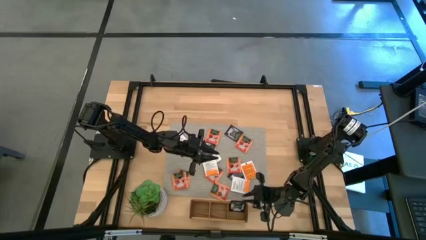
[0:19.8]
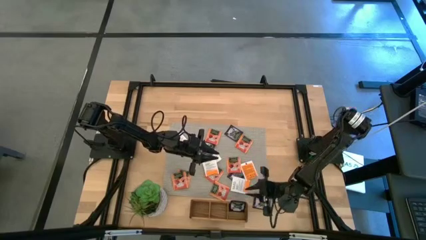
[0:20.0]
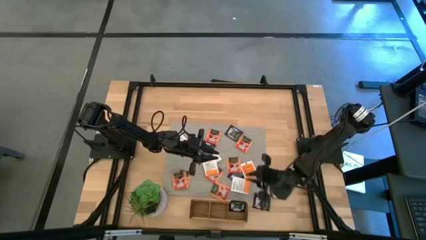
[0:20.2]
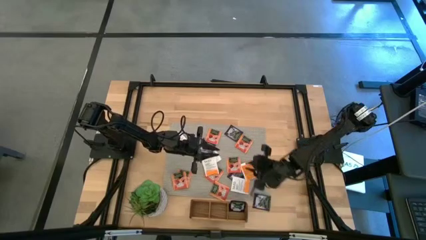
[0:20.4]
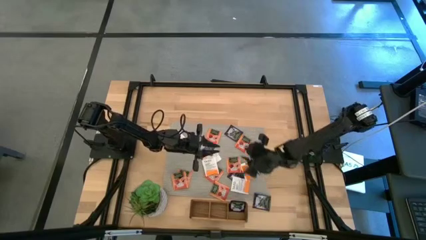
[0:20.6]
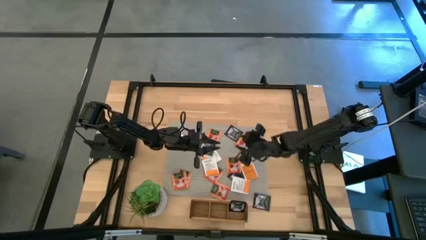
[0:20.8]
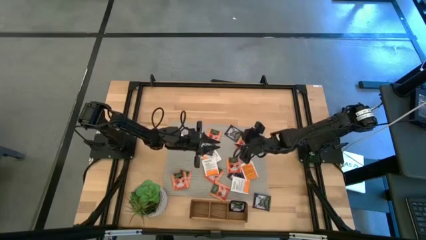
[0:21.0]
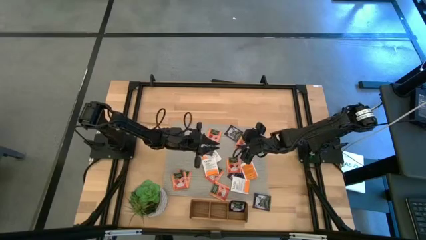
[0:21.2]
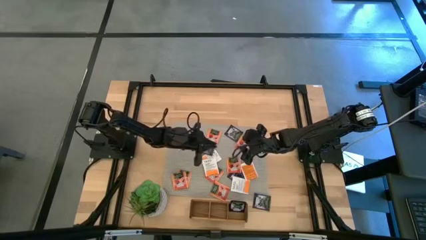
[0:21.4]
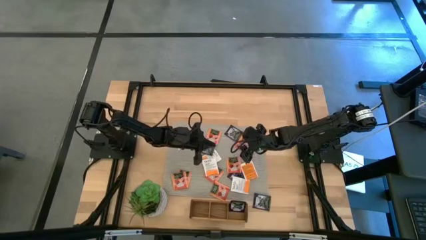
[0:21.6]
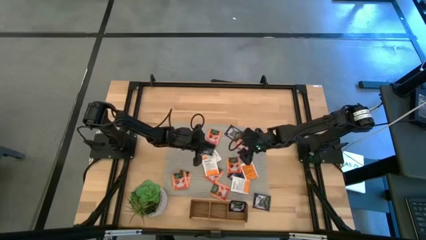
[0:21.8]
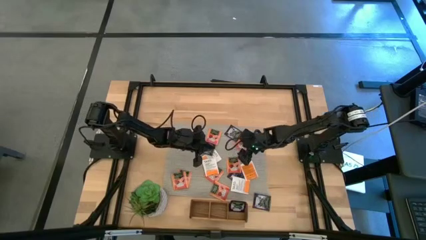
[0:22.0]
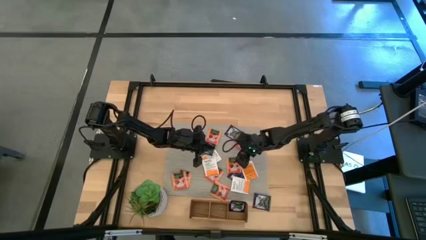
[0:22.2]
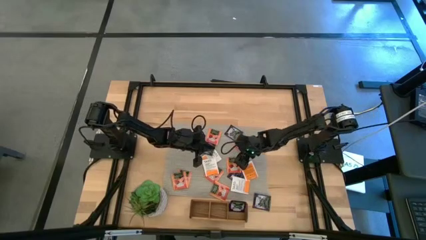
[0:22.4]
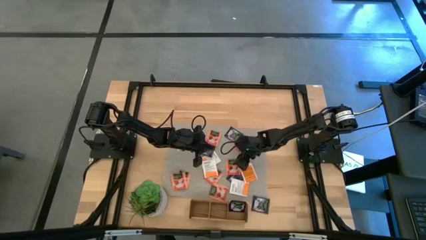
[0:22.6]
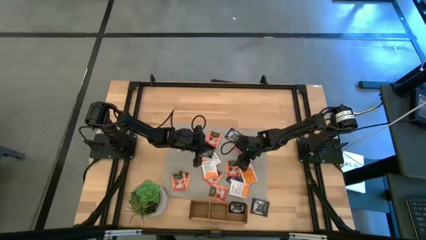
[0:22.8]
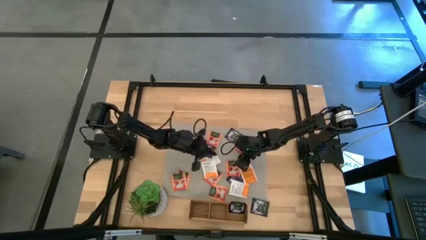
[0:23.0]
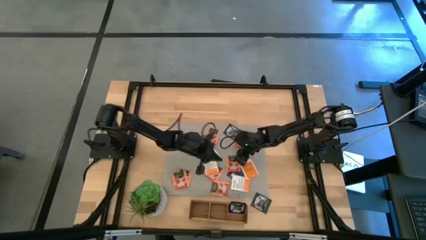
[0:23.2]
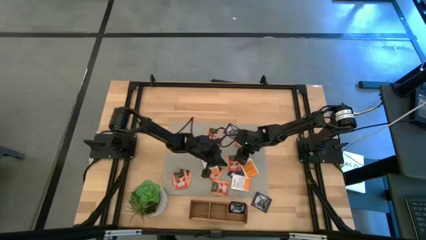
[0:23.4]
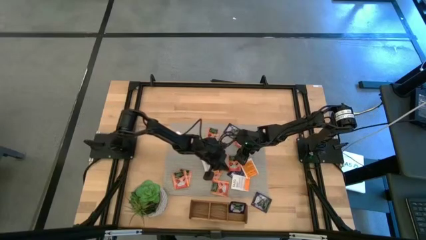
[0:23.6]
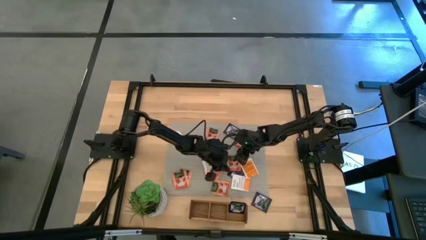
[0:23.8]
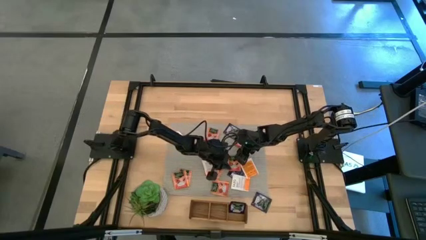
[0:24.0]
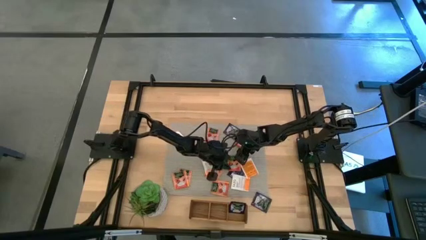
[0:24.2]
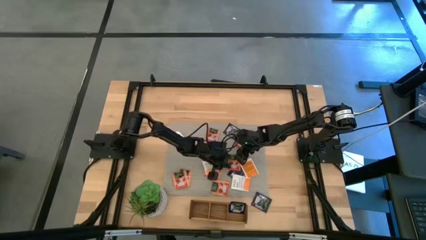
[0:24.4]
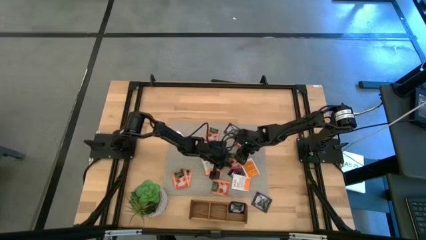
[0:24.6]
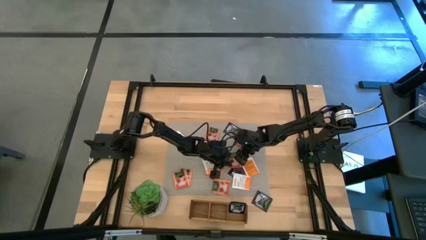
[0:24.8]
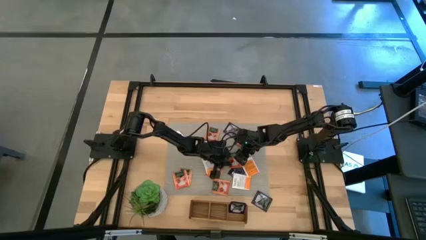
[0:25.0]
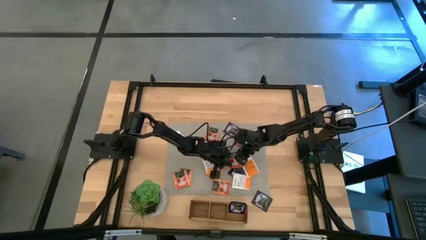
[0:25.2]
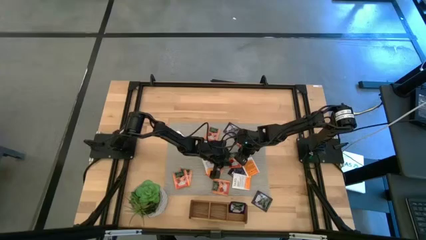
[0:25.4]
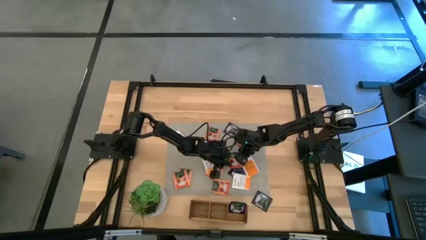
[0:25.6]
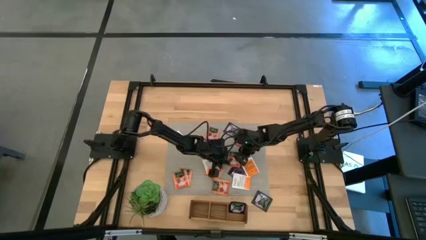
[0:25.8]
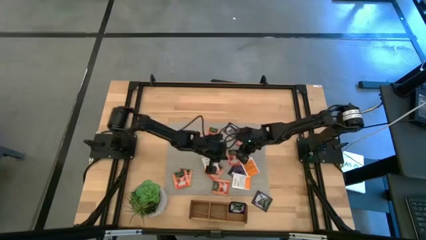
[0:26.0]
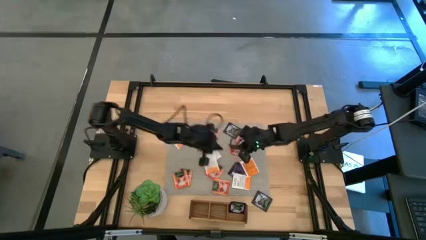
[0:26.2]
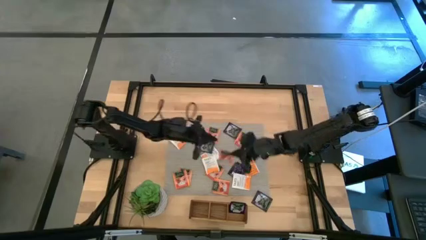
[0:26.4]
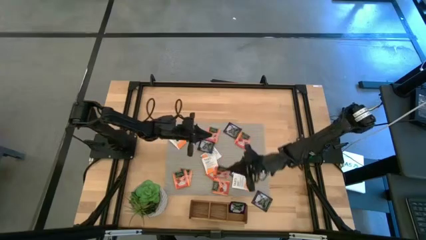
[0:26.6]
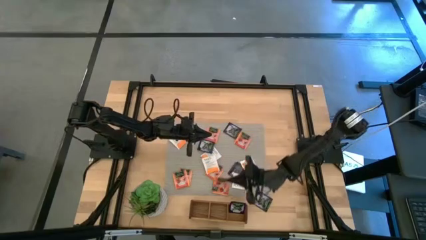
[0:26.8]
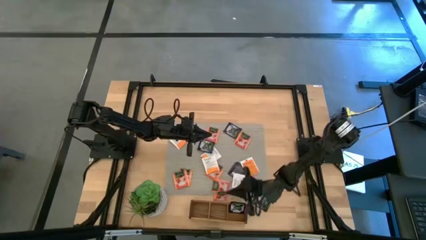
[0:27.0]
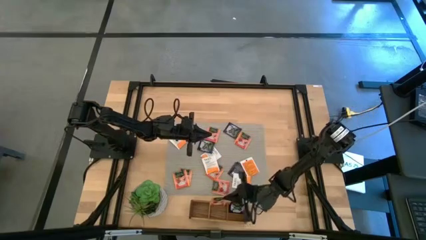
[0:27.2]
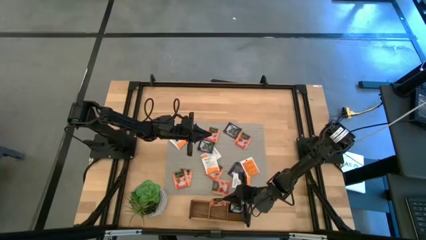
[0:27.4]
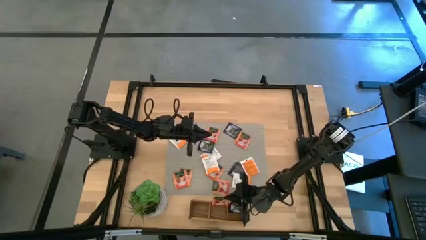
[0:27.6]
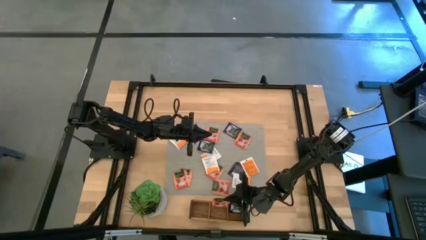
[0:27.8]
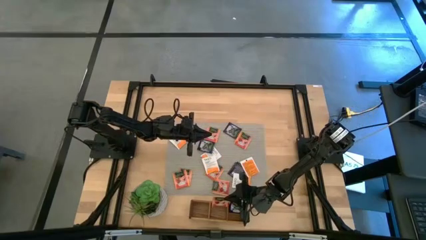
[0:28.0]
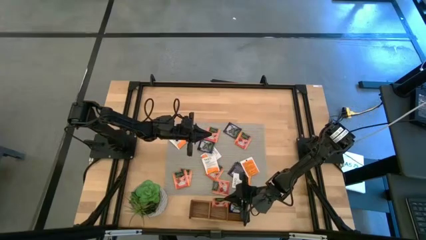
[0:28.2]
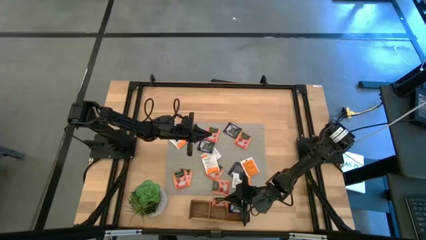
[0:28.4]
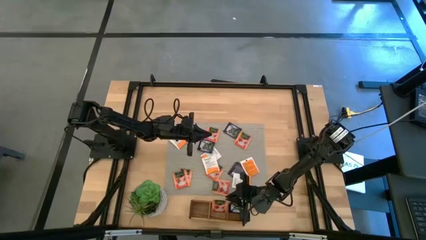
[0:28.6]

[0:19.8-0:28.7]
Task: Pick & Place Tea
Put the orange tea bag into the middle section of the wooden organizer

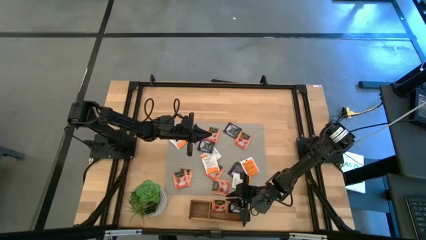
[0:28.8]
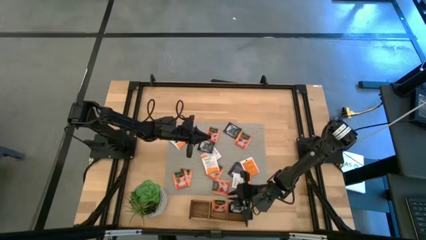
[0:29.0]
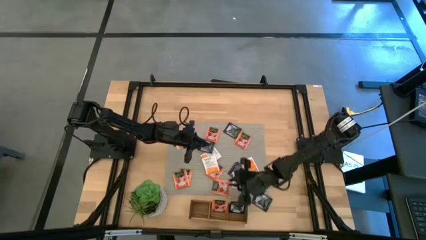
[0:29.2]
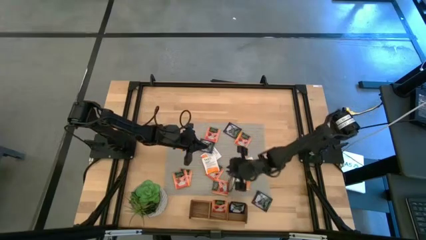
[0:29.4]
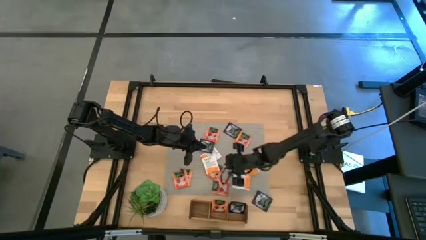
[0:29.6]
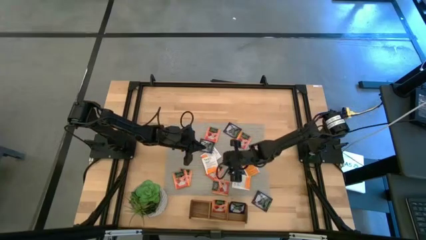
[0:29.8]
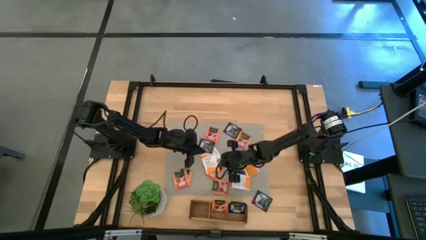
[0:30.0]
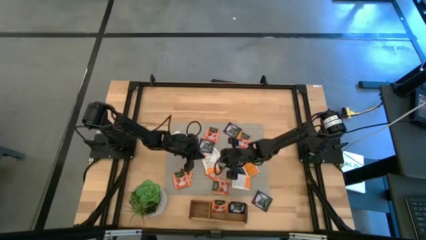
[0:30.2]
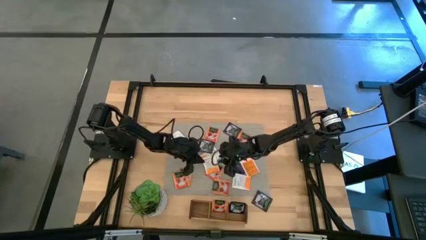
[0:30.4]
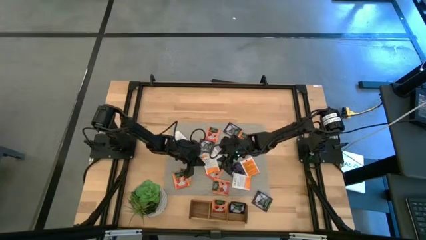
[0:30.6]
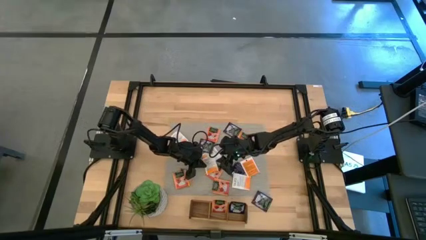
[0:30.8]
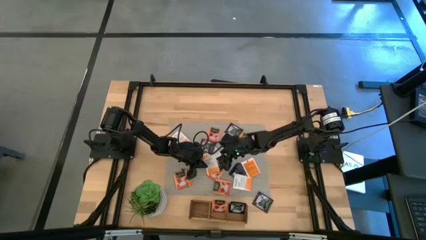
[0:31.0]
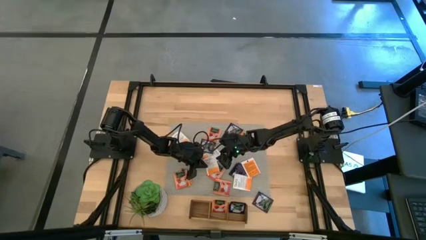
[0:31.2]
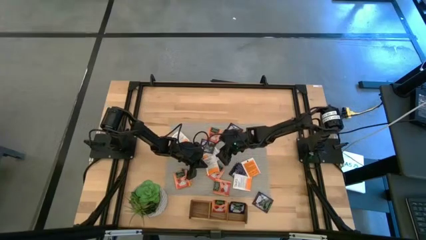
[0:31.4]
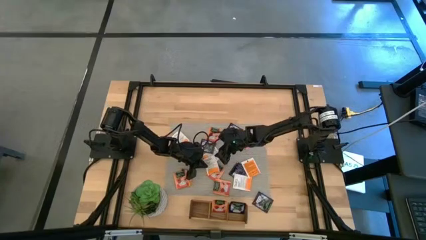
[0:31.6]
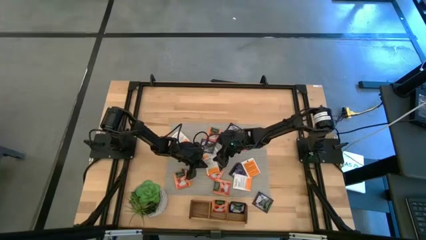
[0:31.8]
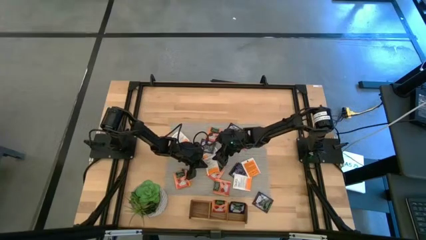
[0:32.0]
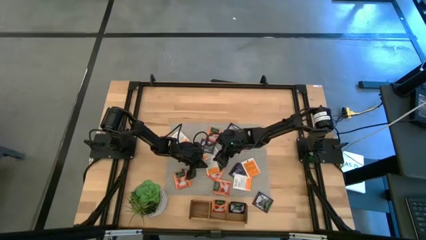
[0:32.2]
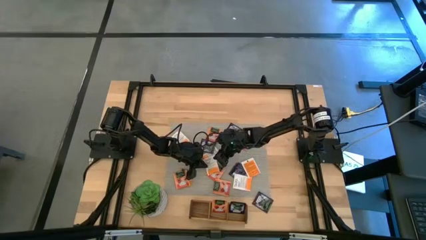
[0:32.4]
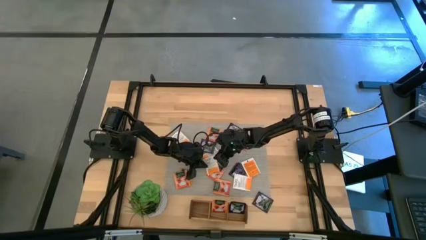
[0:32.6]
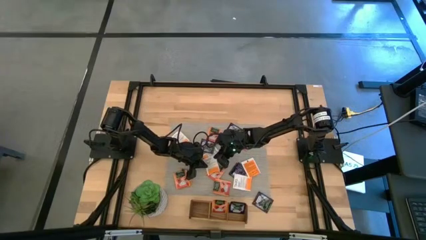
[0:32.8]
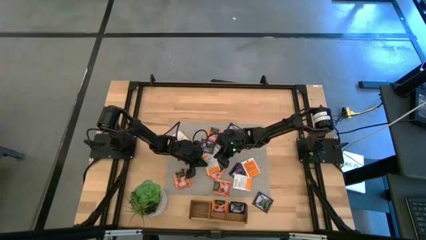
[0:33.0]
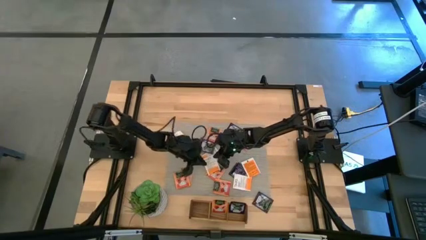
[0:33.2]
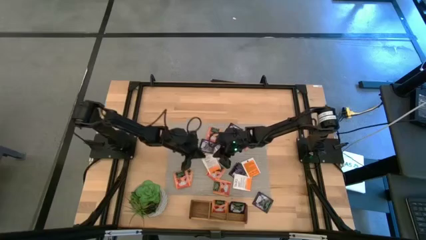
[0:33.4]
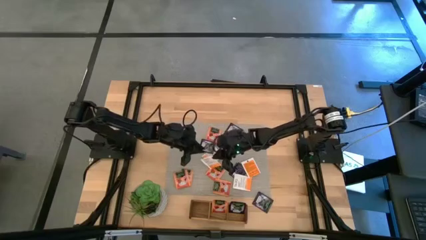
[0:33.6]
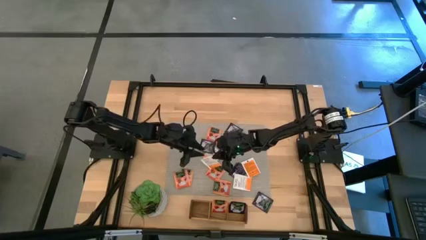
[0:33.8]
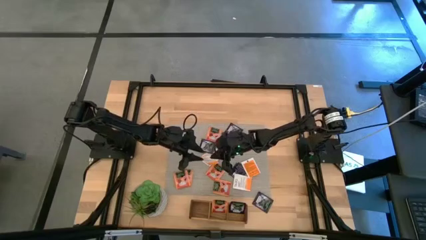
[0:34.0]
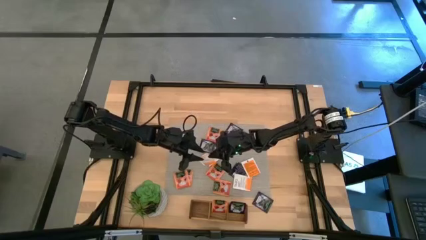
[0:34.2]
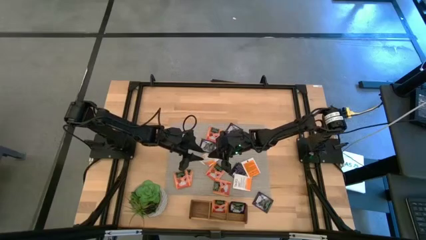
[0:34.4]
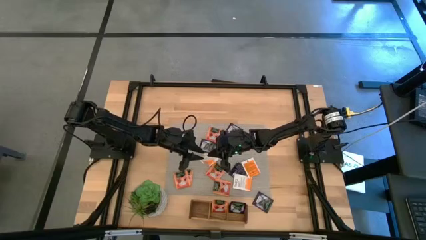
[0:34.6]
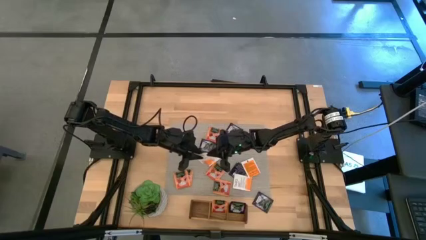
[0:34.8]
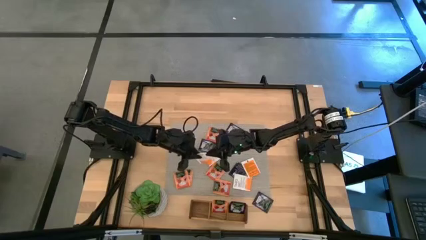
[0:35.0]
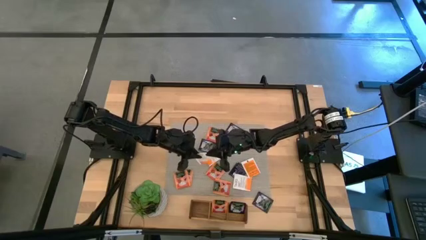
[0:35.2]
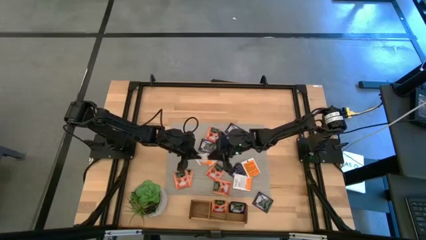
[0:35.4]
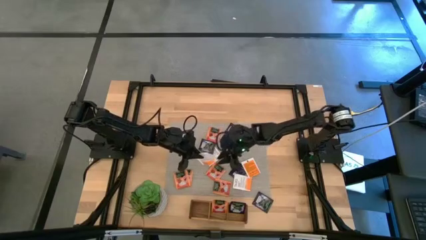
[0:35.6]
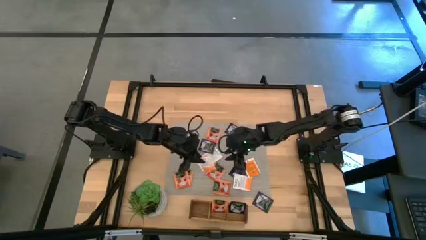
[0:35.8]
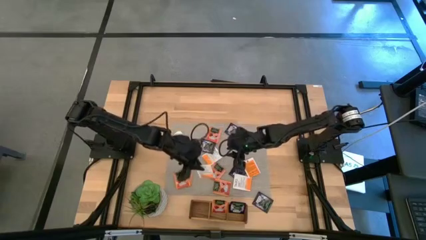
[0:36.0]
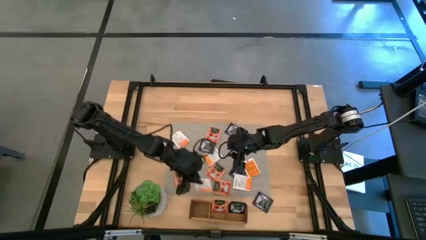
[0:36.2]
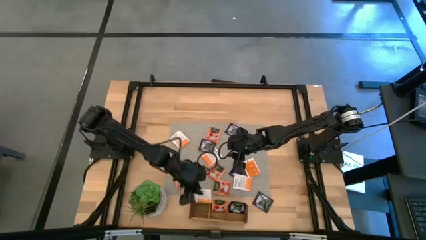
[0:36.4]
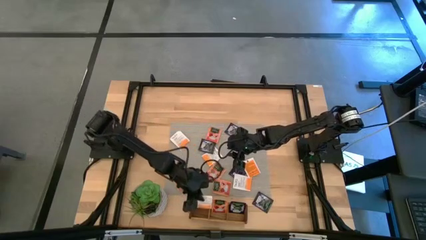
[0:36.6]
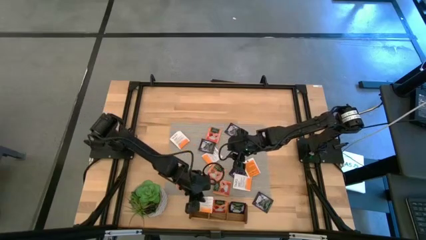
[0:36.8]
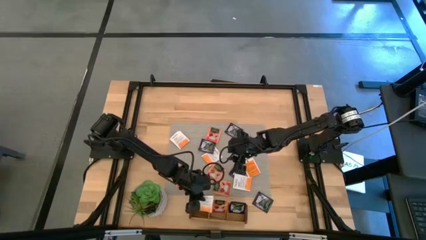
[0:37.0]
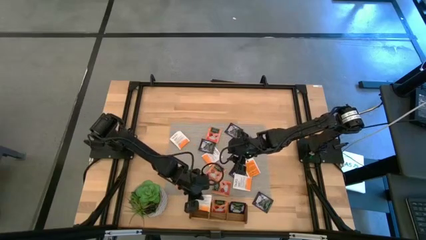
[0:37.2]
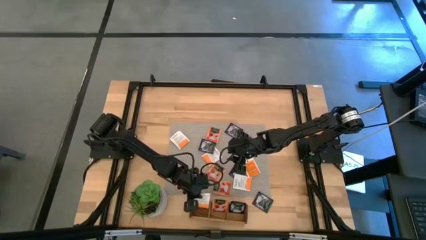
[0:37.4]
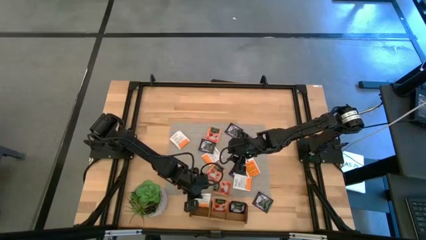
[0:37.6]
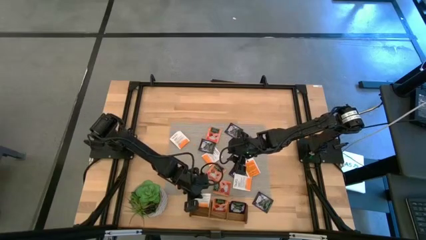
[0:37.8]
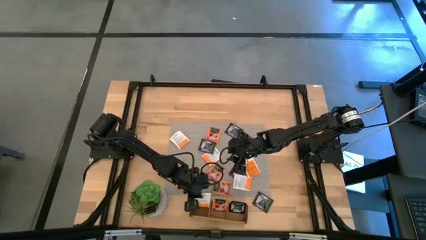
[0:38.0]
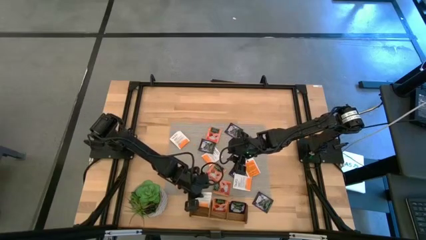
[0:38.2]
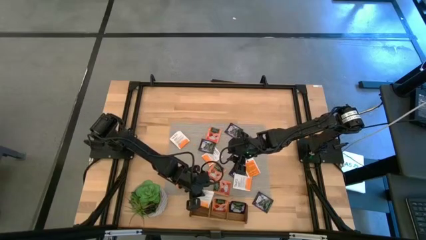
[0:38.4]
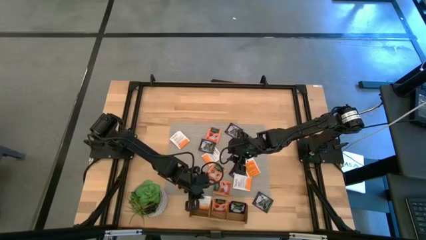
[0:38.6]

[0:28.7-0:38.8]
Put the white and orange tea bag into the left section of the wooden organizer
